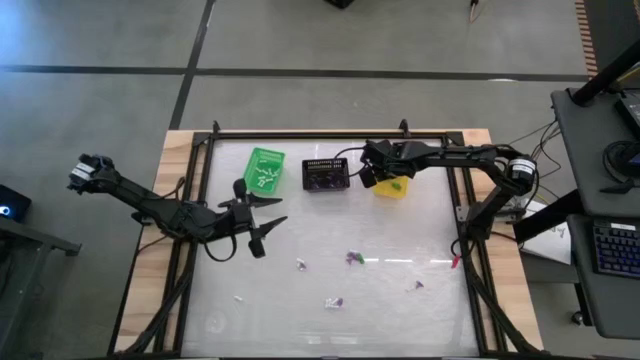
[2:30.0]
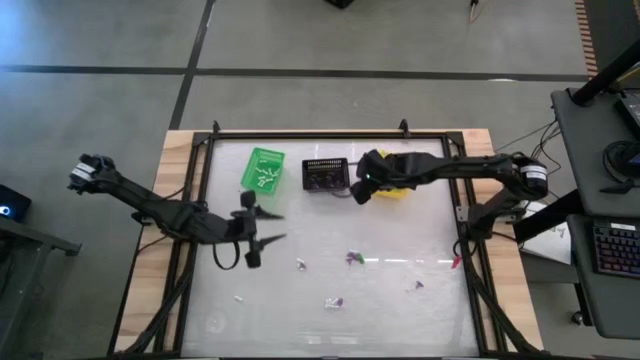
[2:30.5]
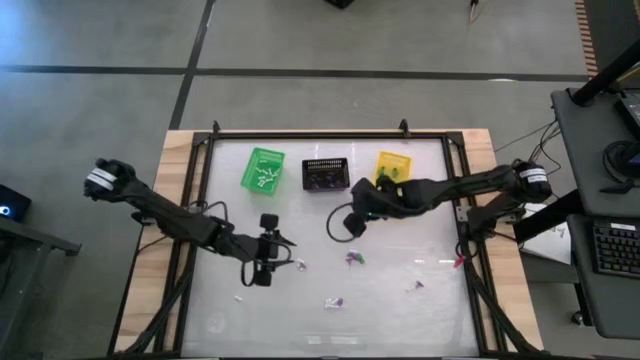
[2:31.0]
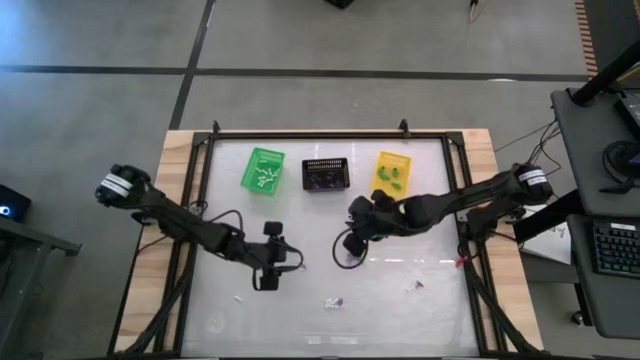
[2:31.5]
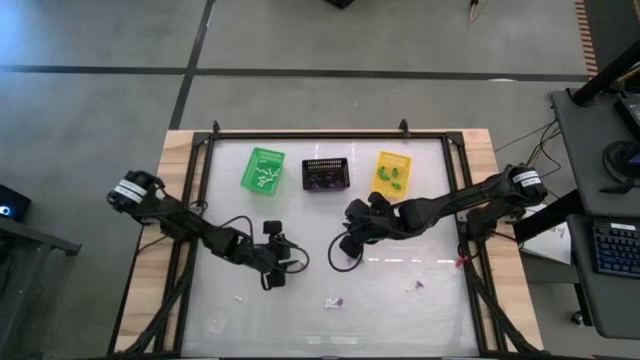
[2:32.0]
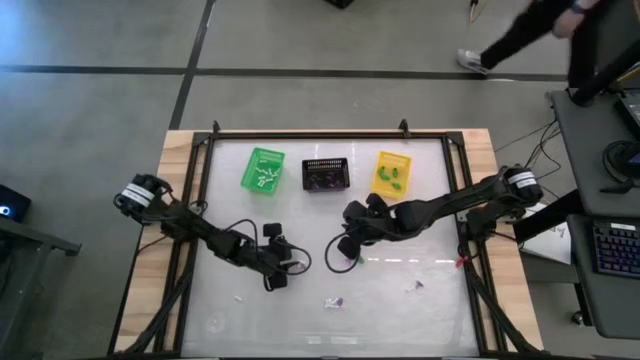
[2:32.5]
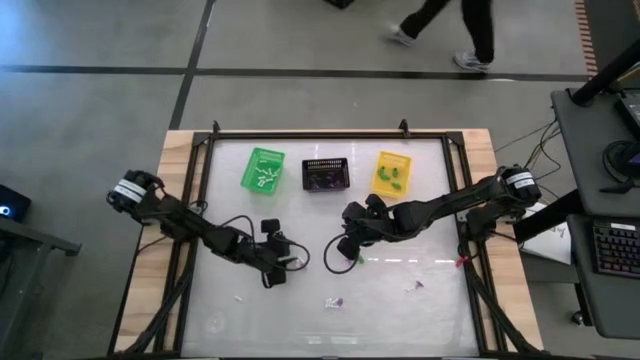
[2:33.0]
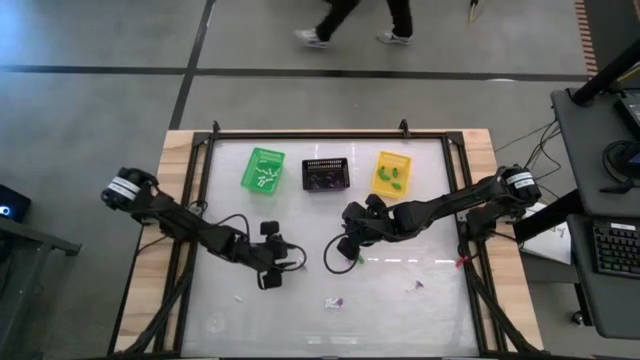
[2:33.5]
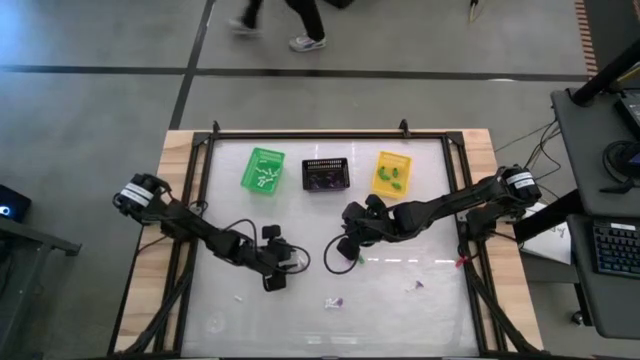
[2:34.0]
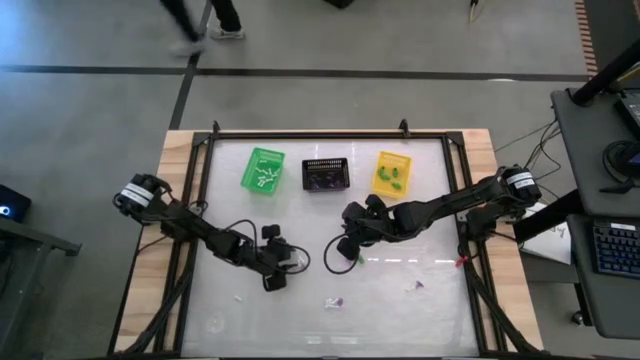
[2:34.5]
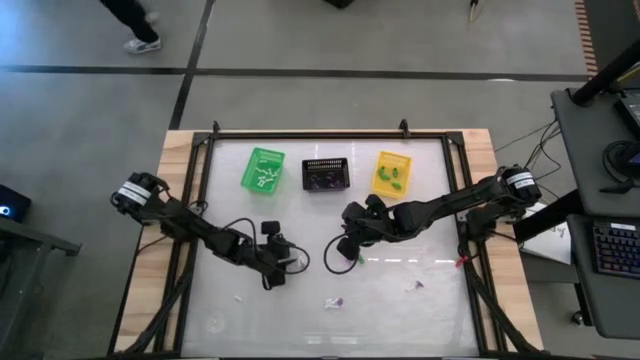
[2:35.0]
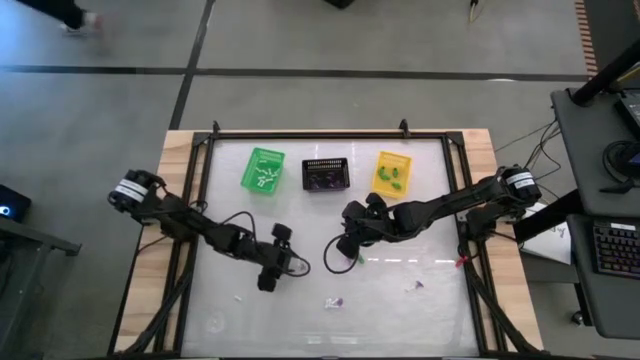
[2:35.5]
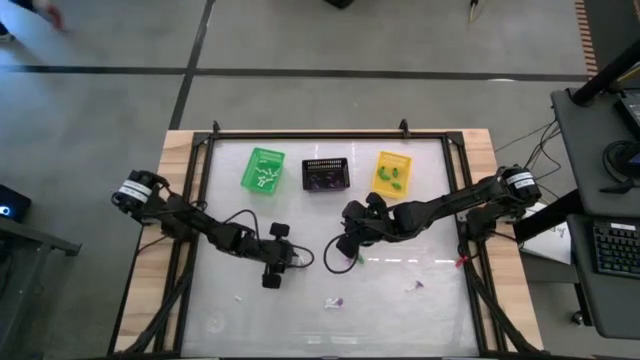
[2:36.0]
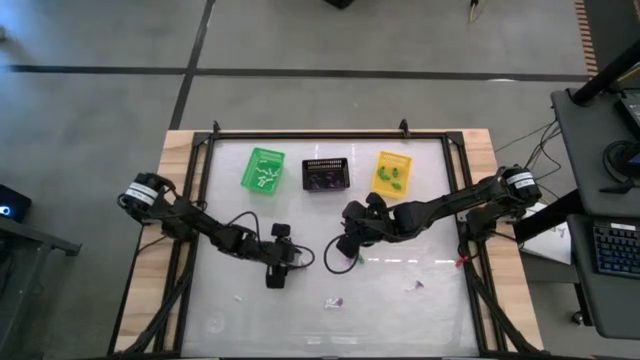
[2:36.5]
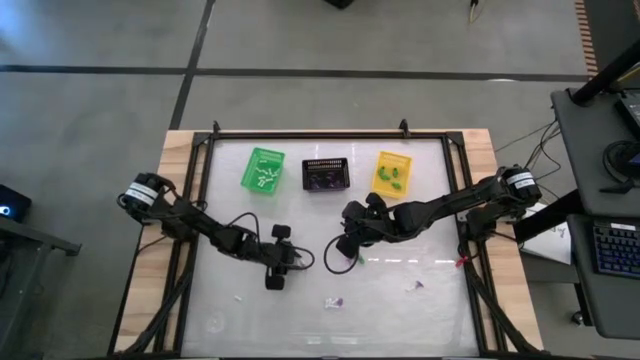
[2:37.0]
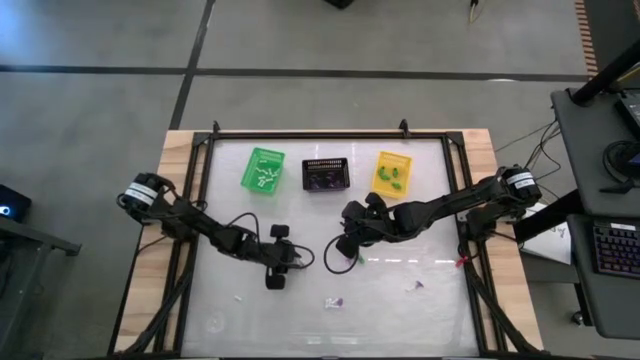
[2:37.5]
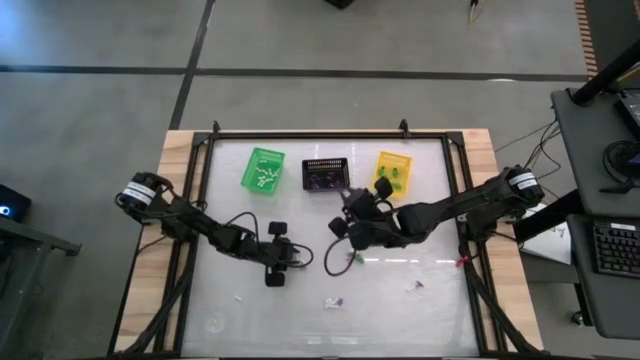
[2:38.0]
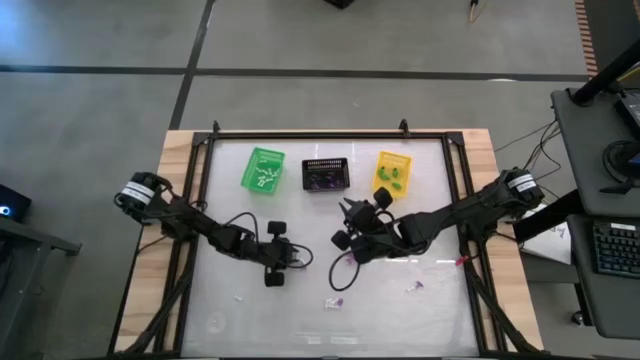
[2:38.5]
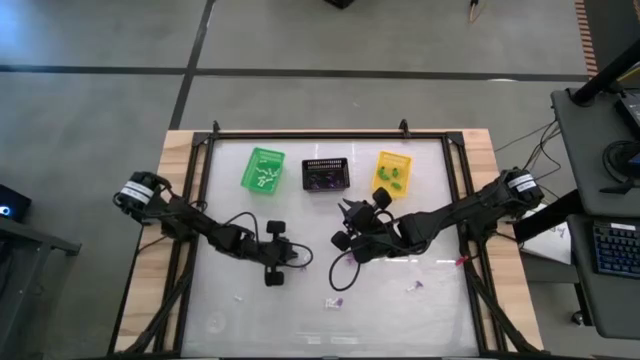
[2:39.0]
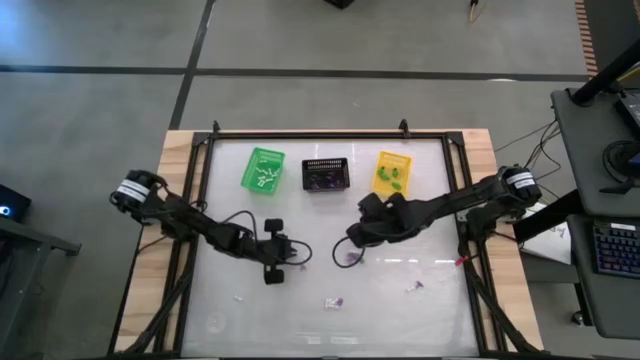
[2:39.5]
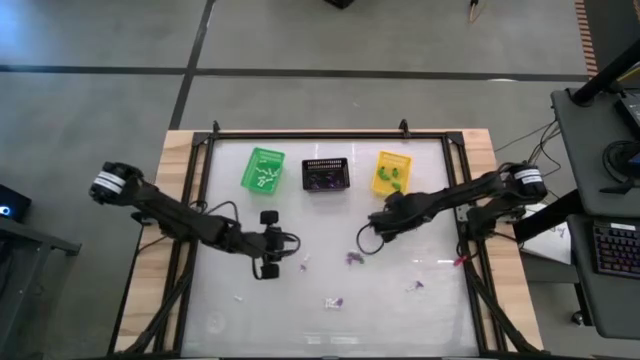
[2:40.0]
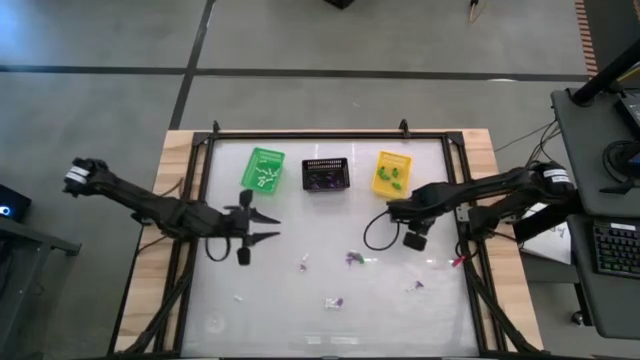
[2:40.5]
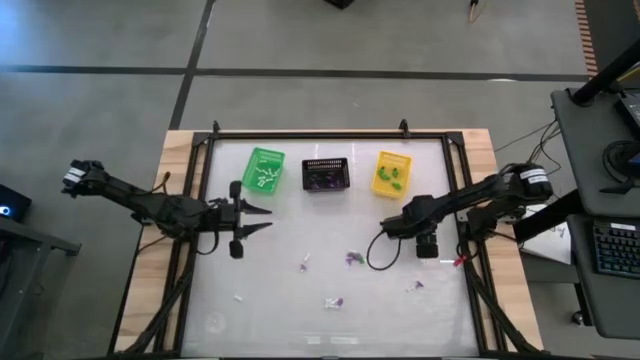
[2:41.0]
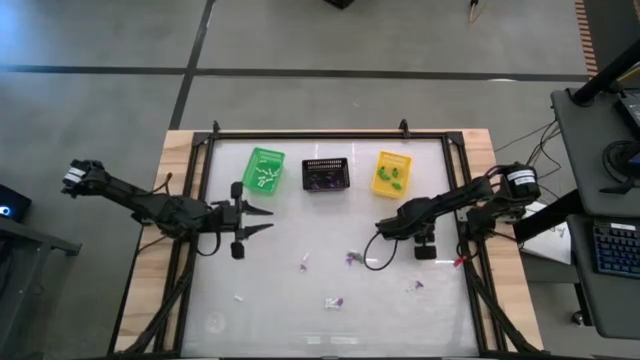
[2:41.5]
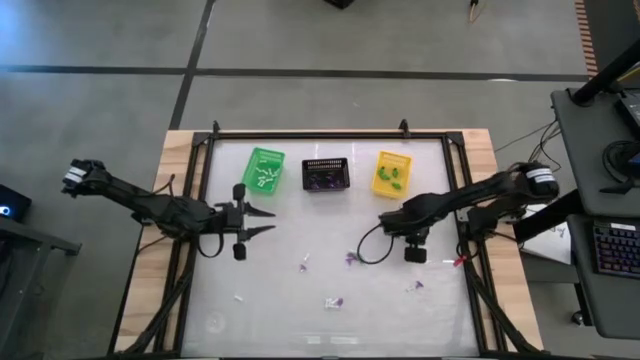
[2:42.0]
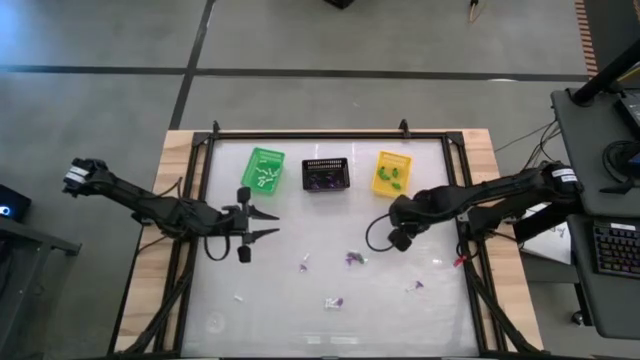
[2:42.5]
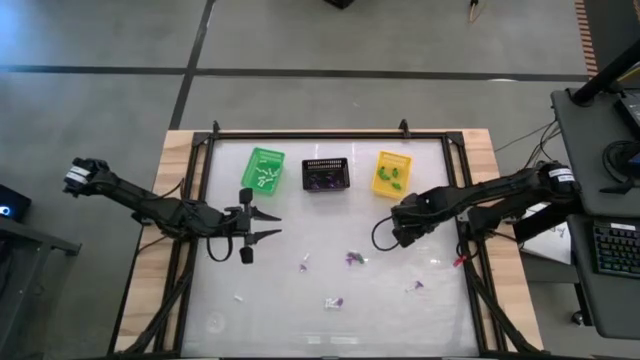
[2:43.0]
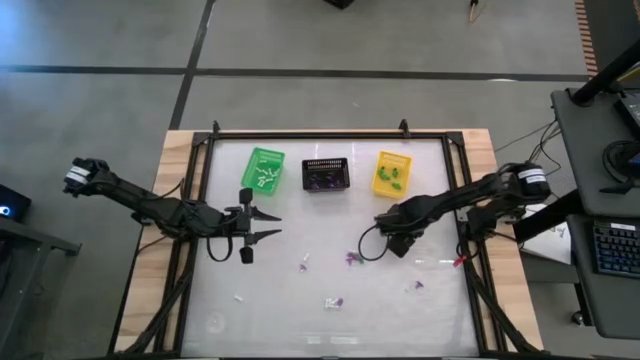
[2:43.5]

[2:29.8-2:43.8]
Task: Sort Halloween decoration
Put the white bone toy into the green basket

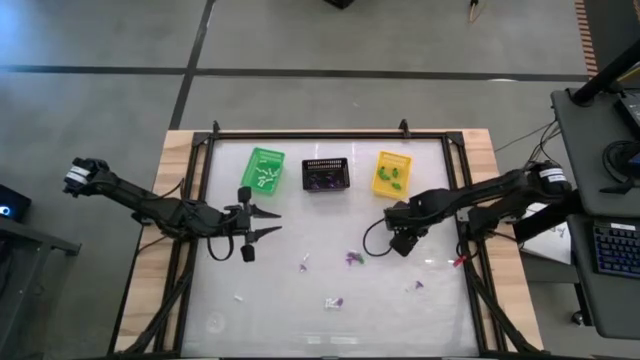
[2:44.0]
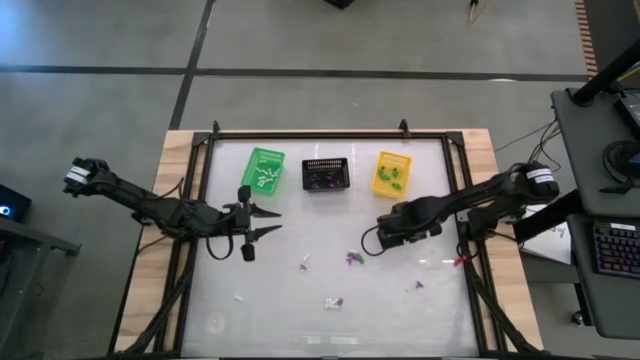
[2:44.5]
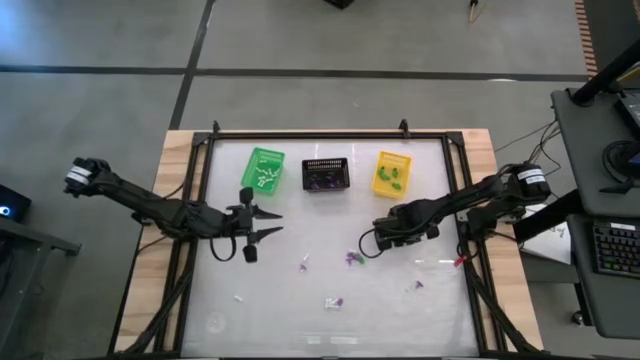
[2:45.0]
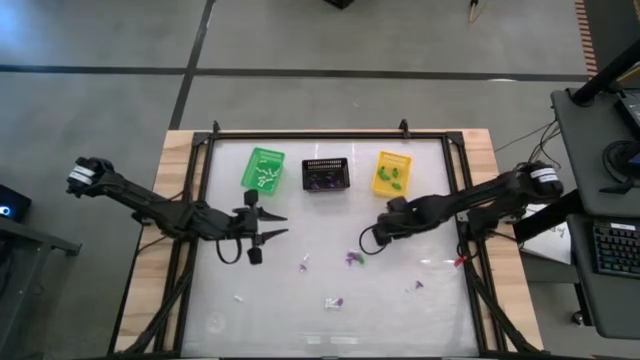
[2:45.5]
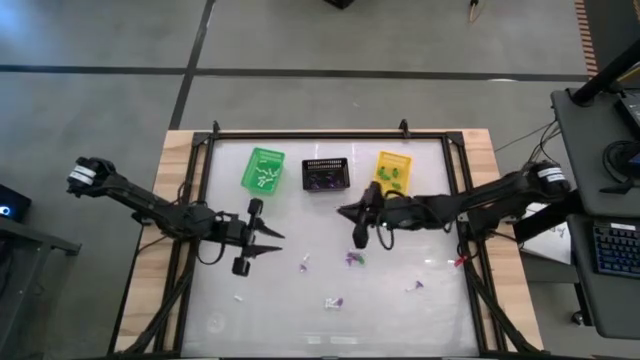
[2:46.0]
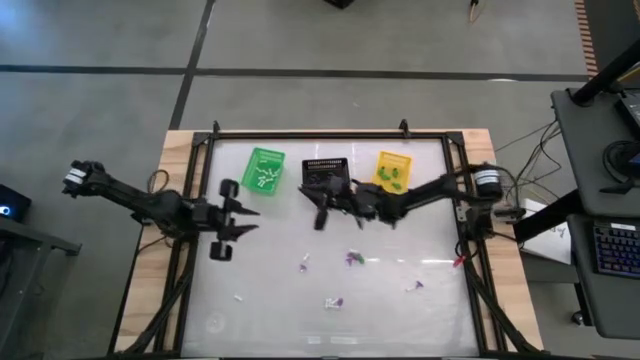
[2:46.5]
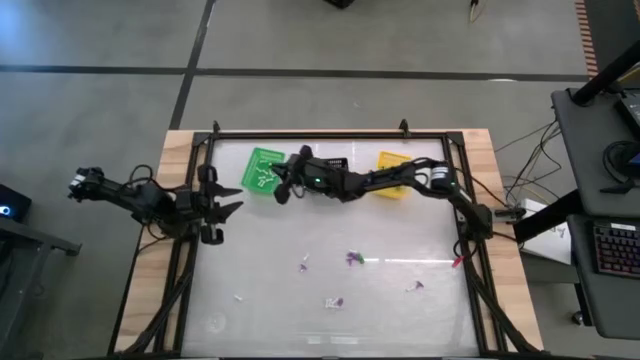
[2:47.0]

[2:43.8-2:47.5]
Put the white bone toy into the green basket

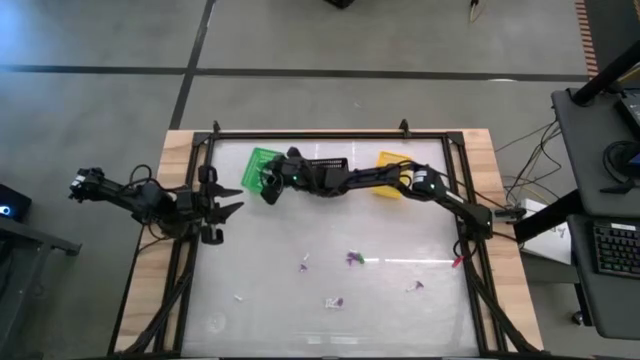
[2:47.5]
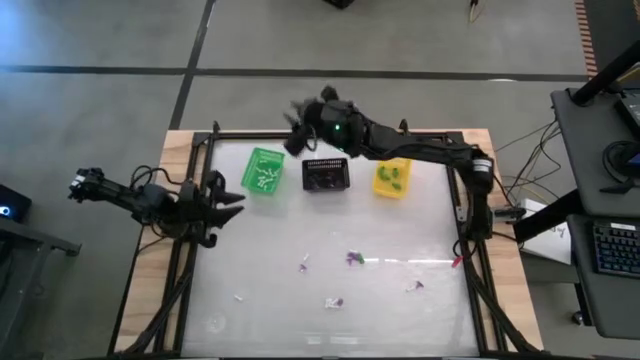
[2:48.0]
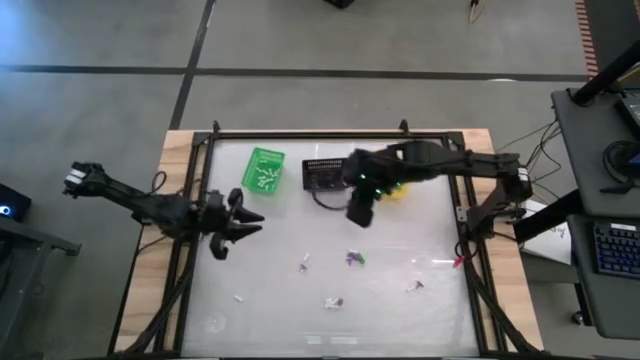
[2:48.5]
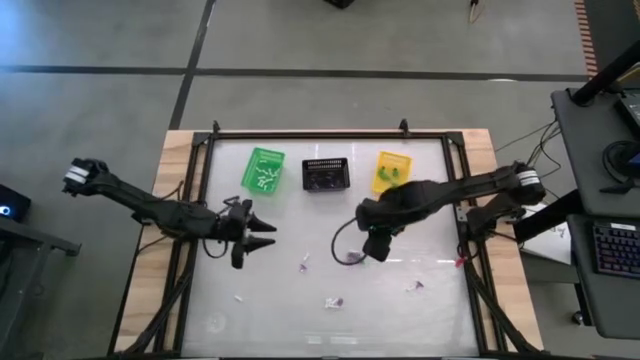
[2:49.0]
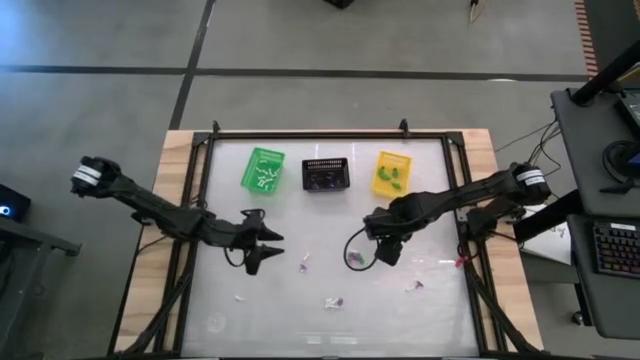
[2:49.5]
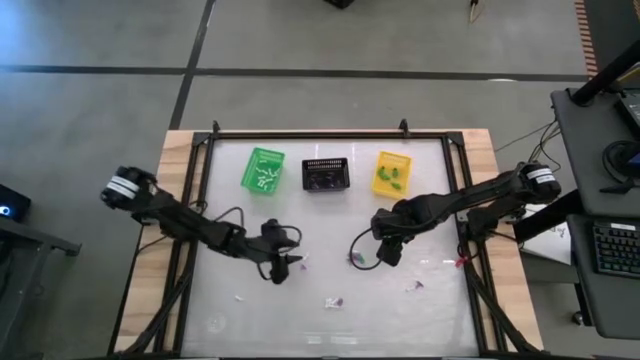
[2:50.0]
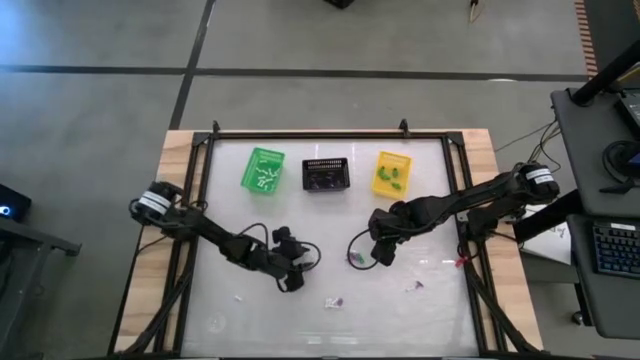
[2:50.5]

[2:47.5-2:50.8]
Put the purple witch hat toy into the black basket
